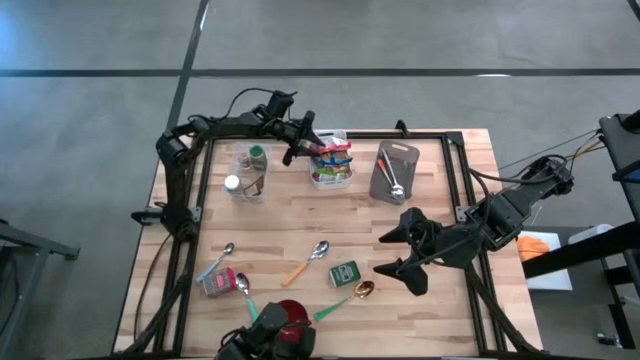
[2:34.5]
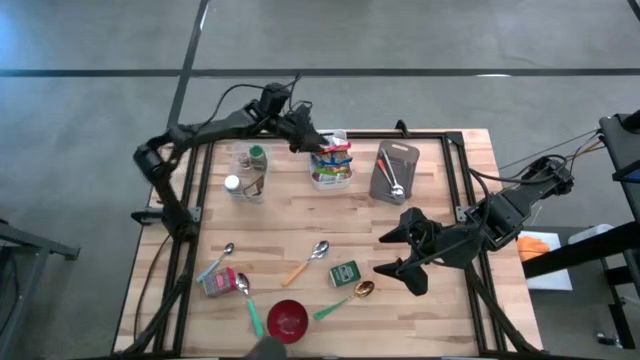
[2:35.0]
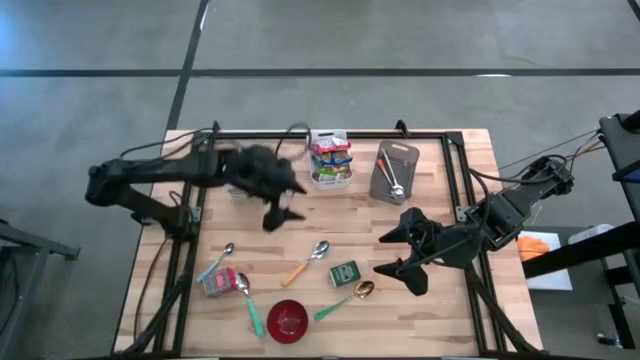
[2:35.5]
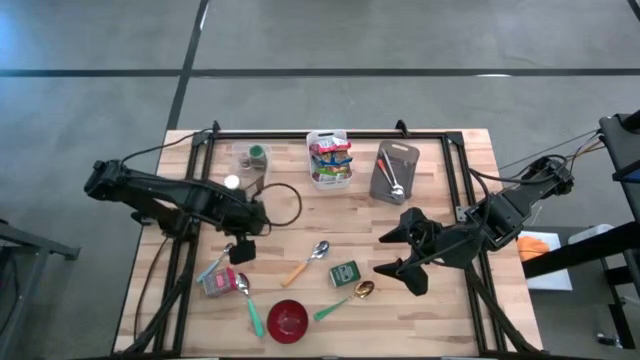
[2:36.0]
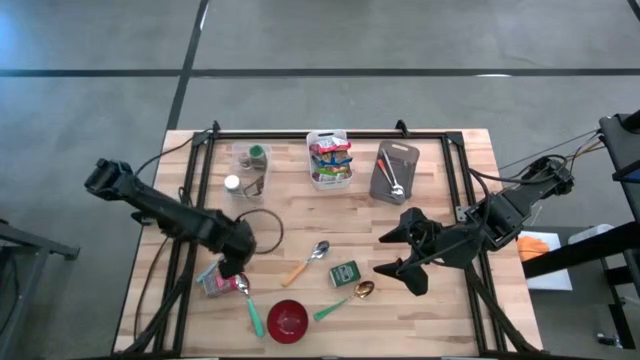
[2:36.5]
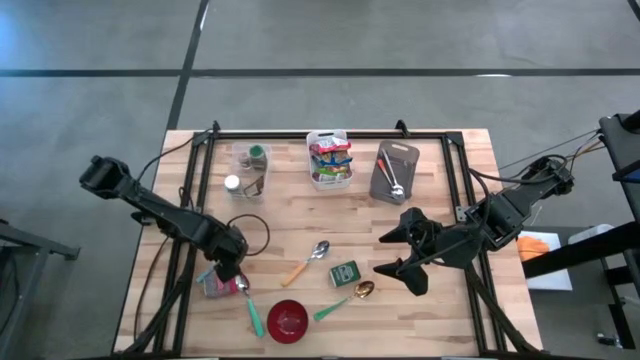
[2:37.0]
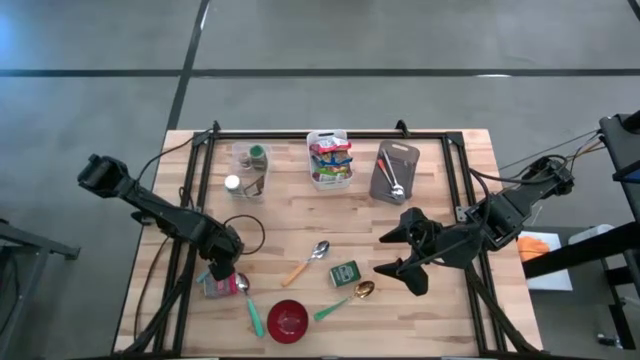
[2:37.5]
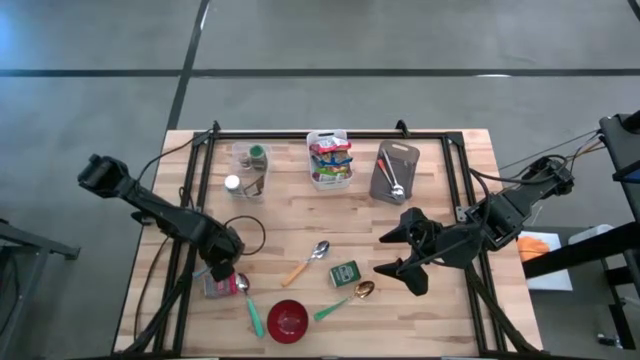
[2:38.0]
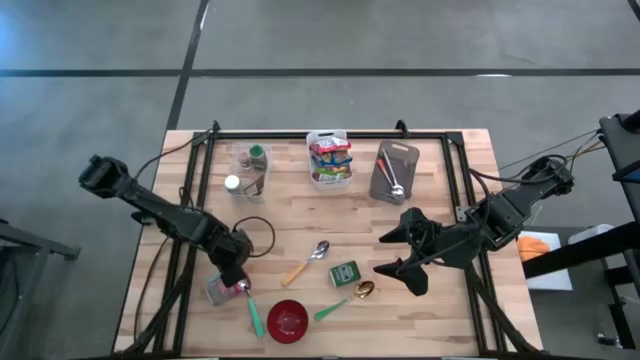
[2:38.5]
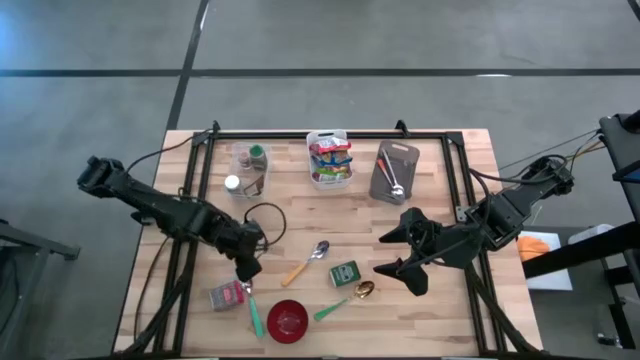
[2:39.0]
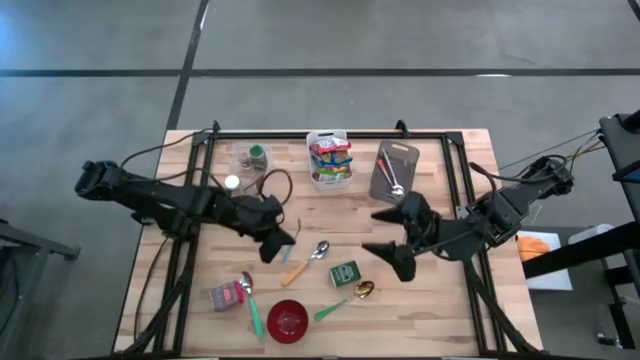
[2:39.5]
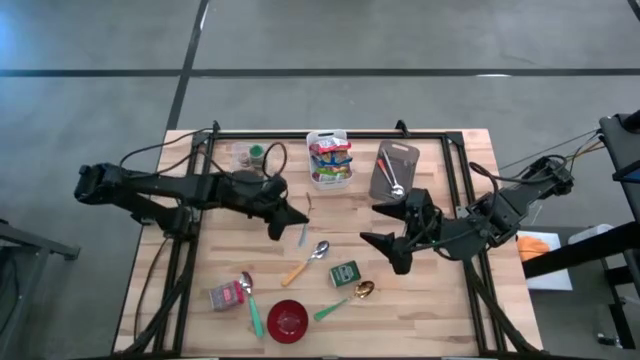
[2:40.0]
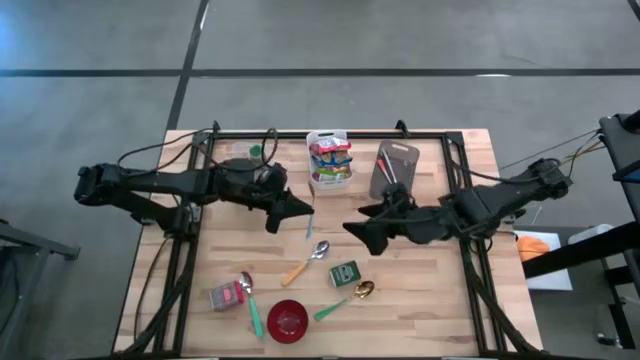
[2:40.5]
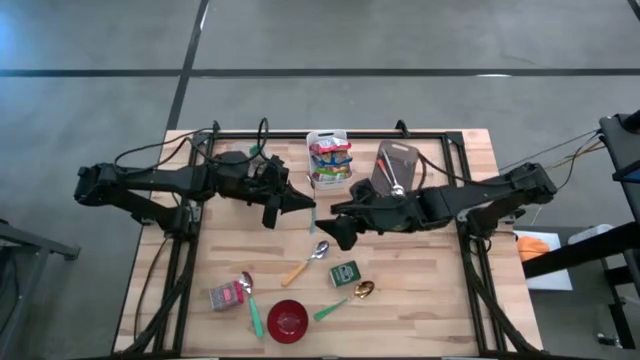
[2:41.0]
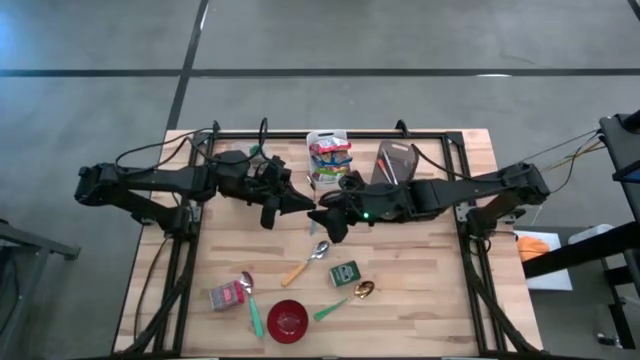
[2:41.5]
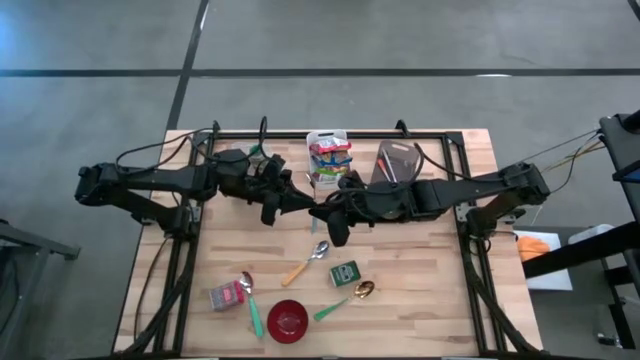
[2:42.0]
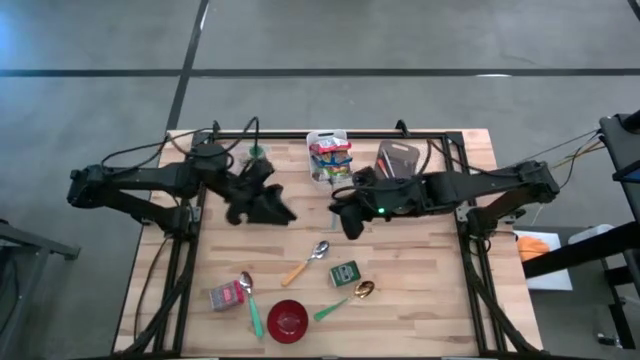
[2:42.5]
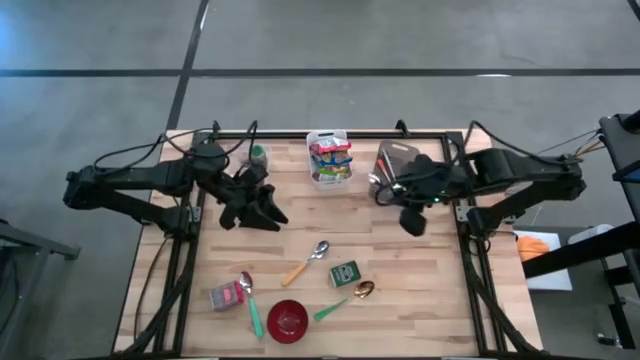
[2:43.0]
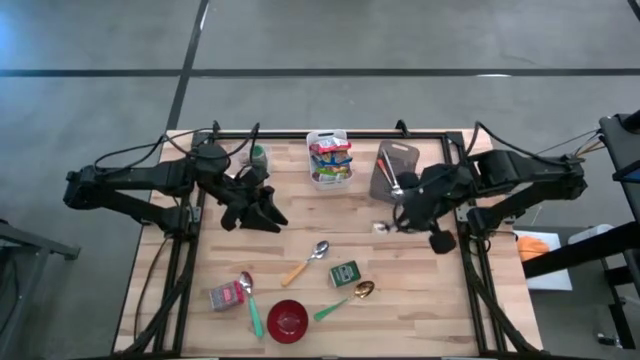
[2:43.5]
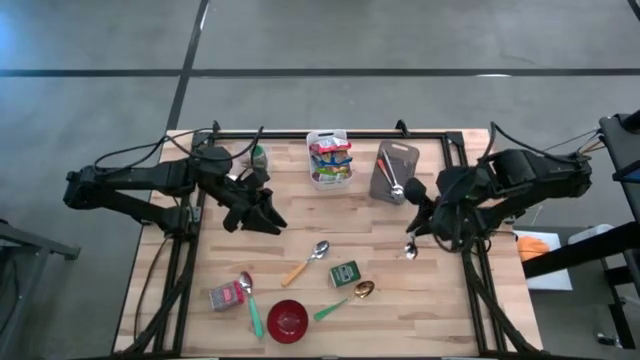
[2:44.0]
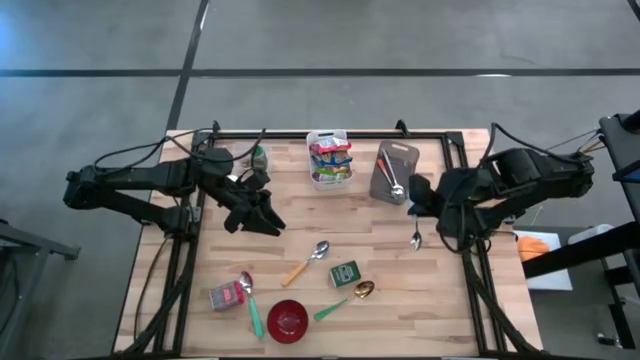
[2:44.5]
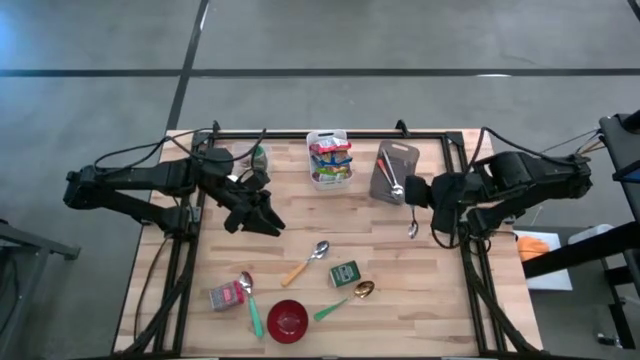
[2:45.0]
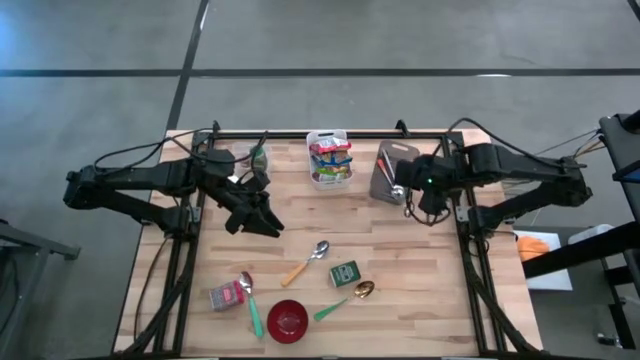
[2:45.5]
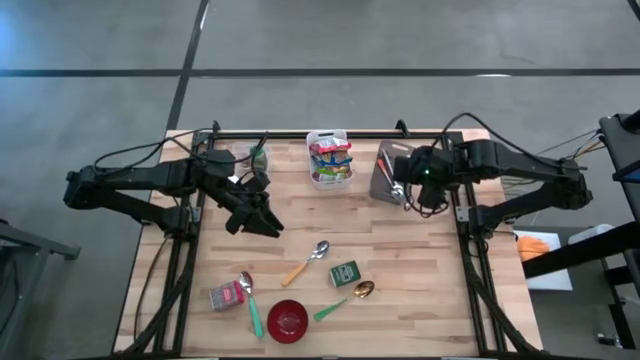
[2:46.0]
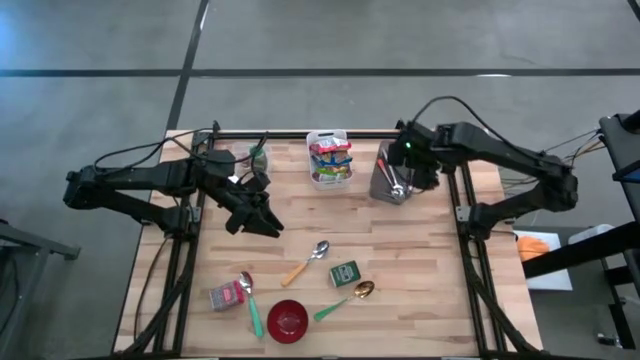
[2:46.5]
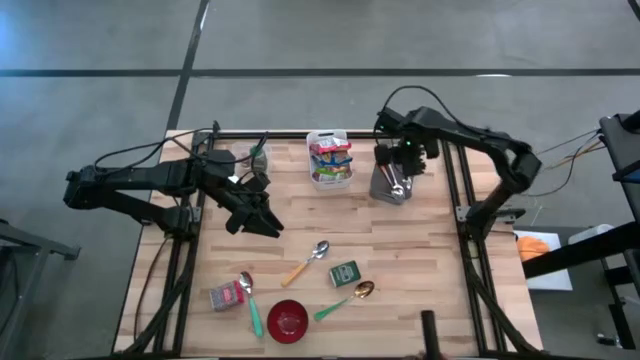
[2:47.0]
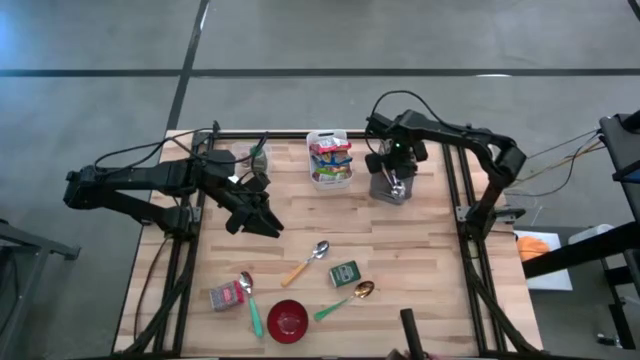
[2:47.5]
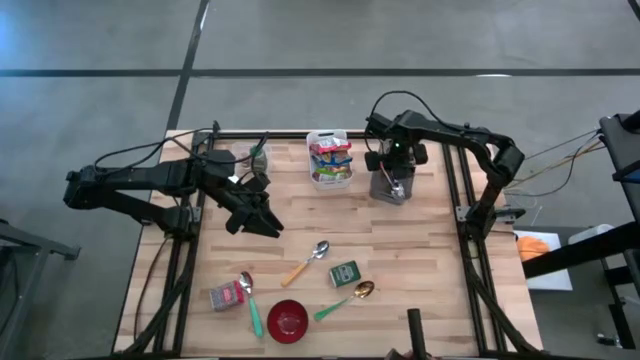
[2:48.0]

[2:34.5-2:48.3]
Put the light blue spoon into the black bin

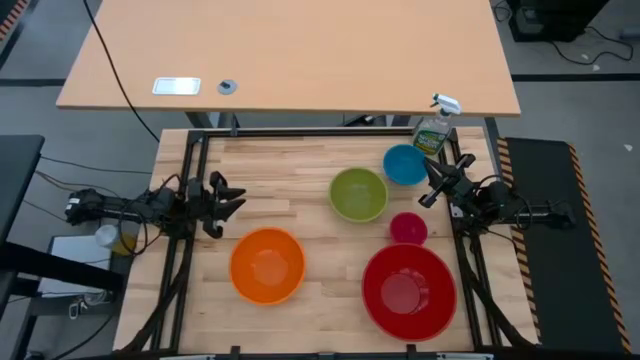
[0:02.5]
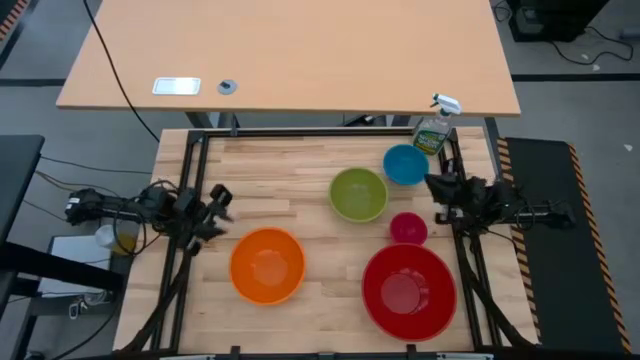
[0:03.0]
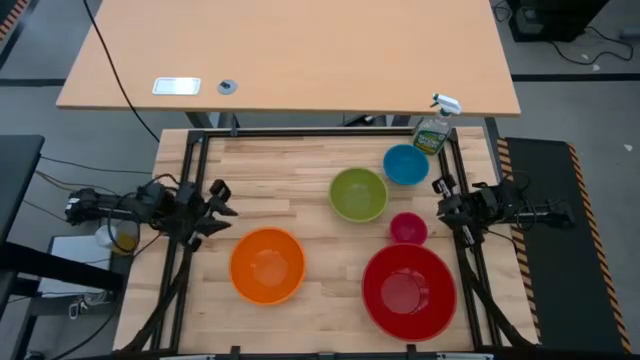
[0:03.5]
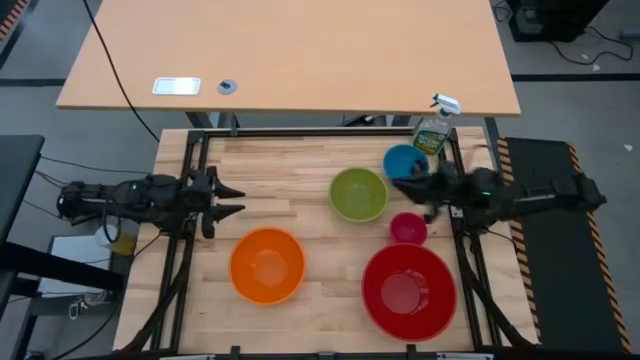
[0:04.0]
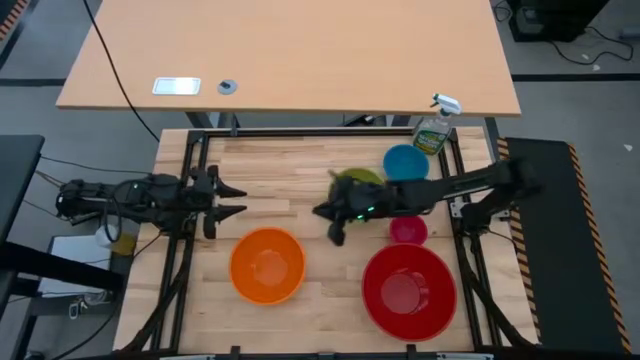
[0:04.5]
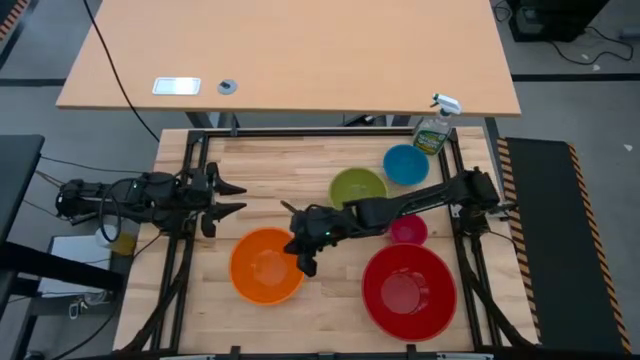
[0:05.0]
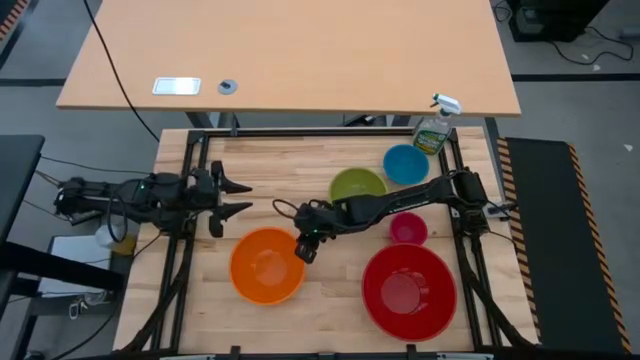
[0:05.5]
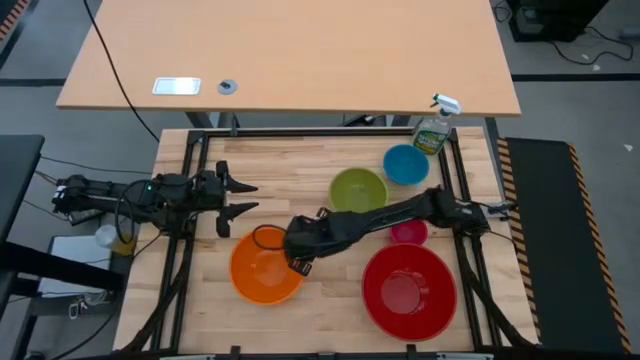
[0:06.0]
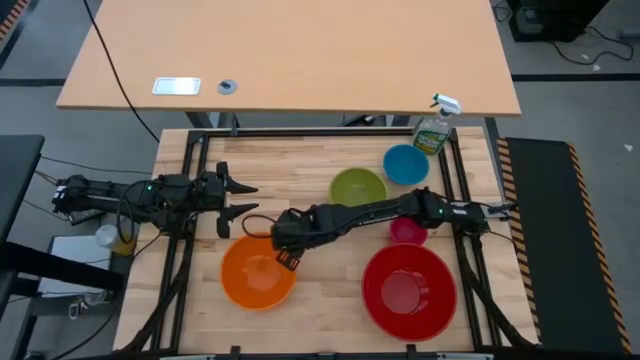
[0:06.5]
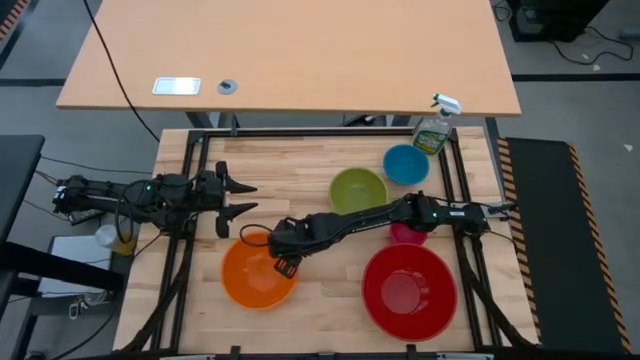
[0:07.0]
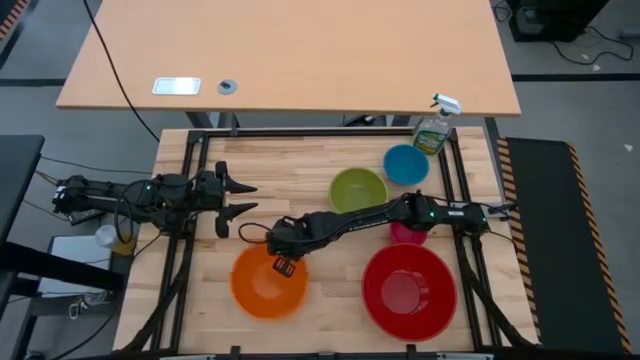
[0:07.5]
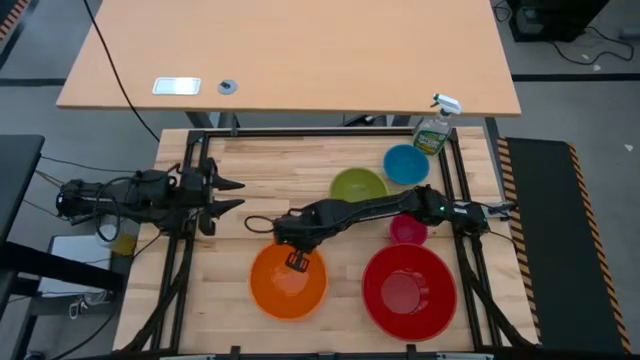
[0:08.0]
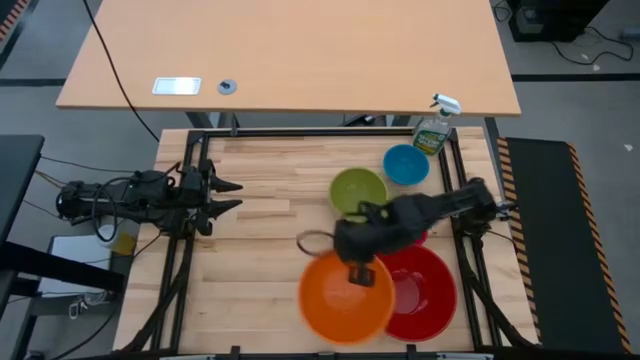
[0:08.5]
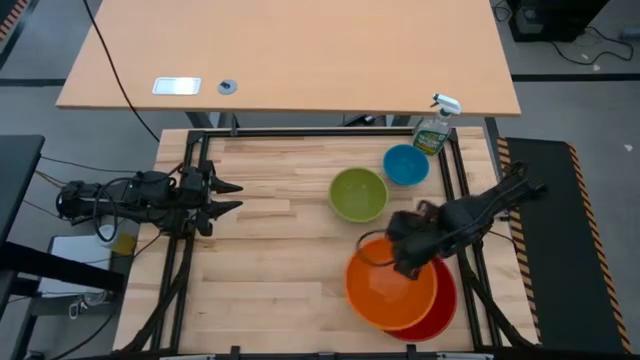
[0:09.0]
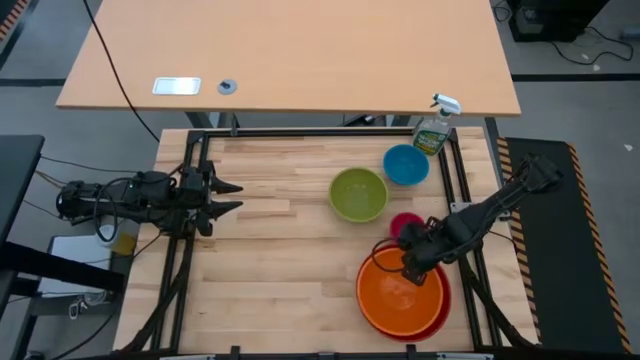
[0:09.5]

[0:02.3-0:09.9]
Stack the orange bowl on the red bowl
